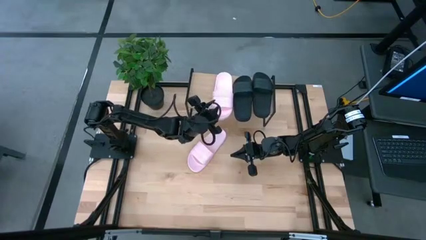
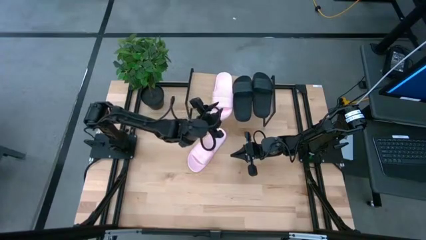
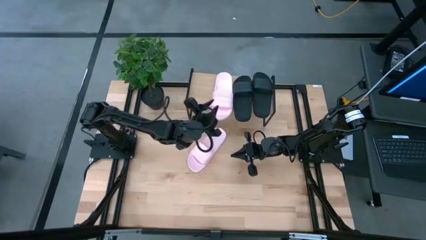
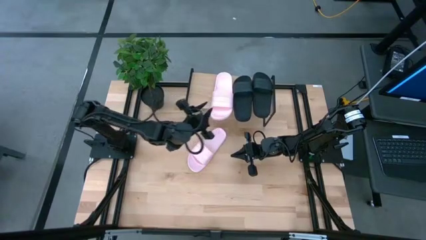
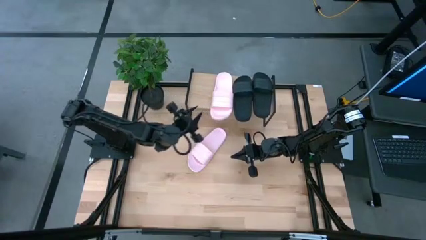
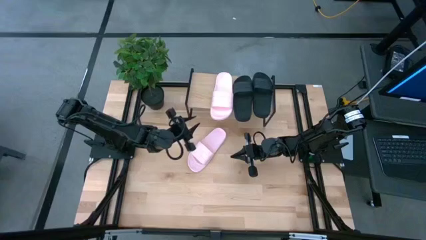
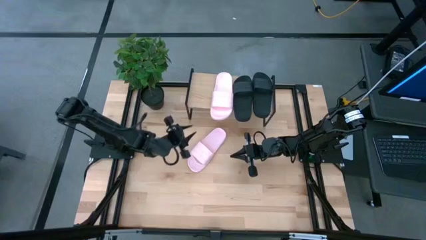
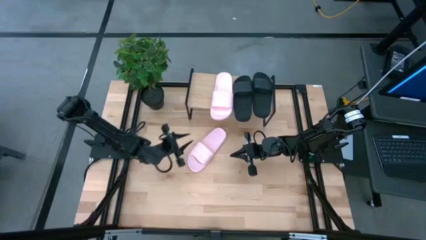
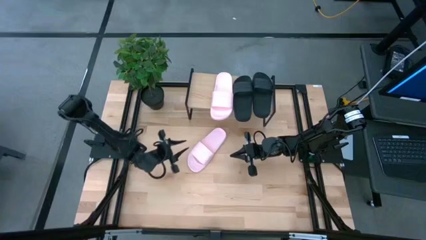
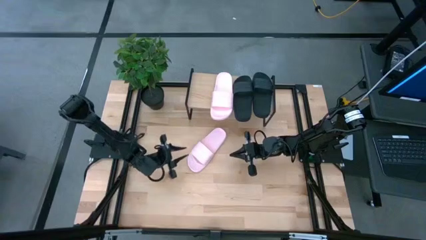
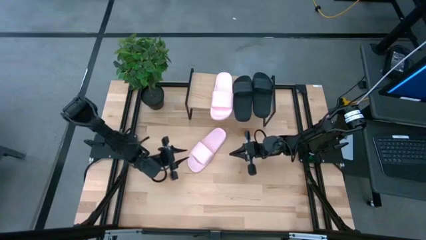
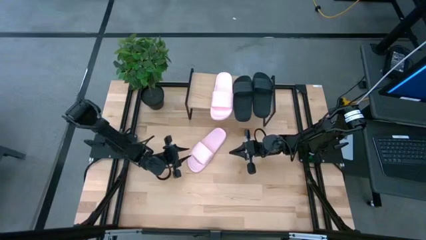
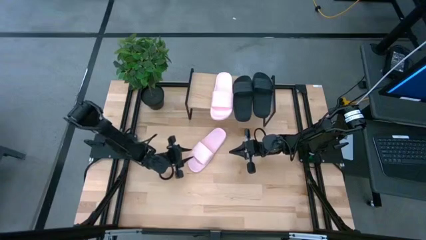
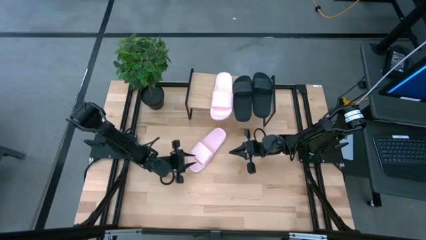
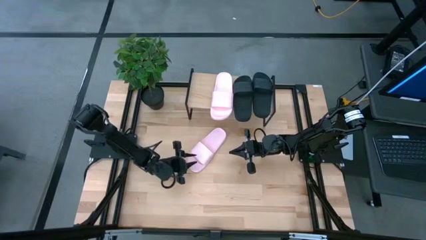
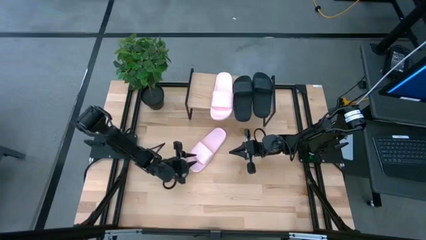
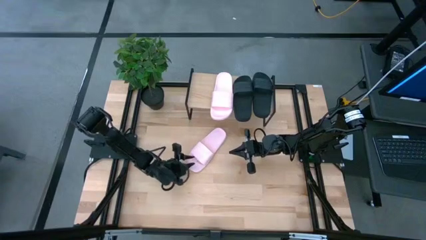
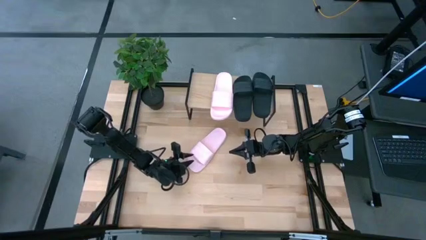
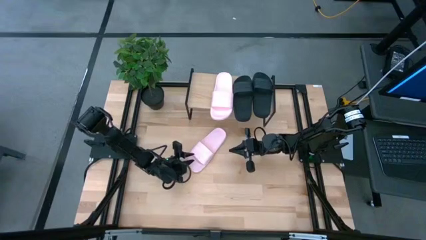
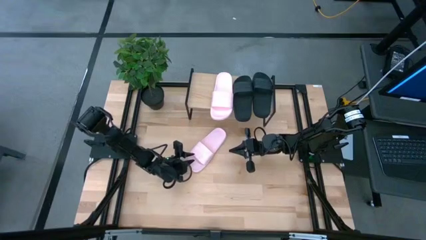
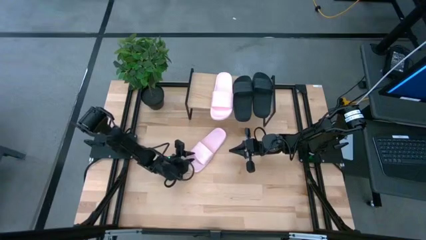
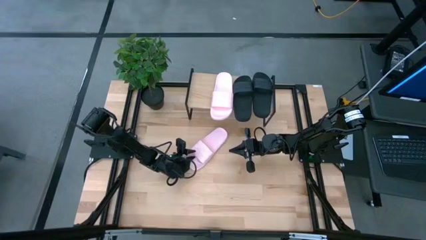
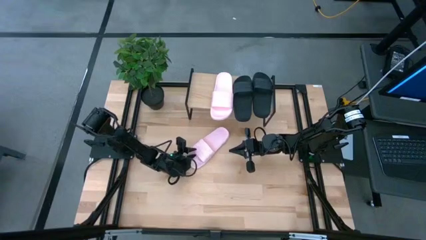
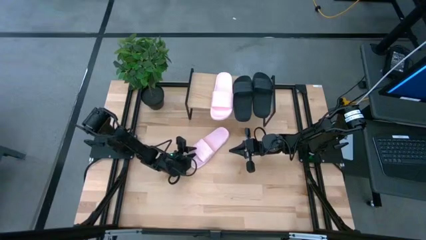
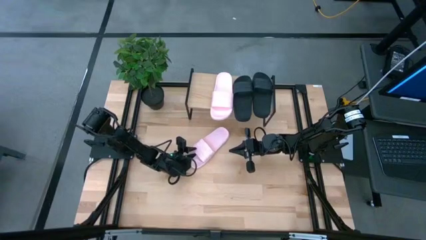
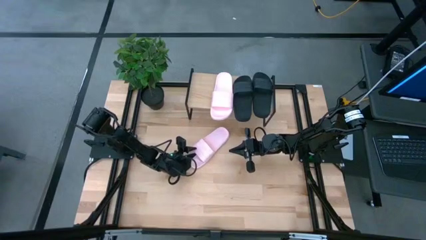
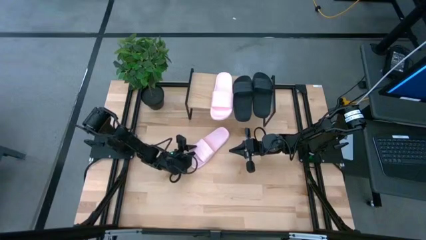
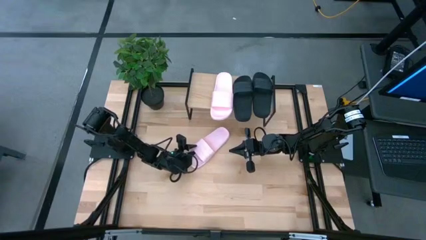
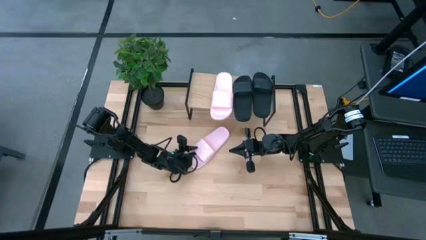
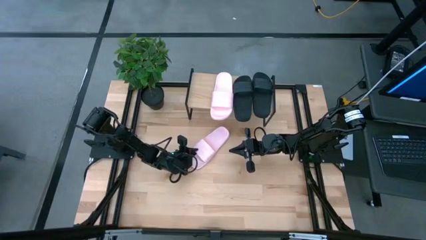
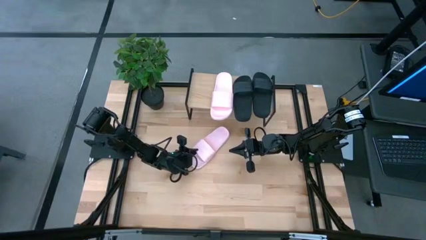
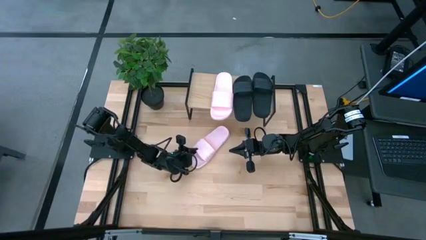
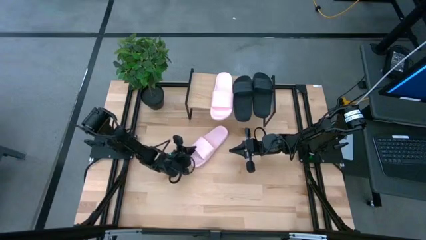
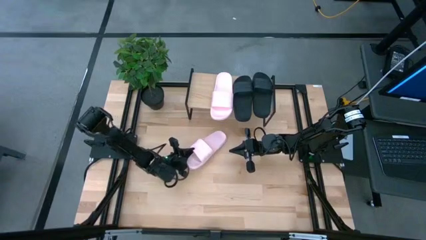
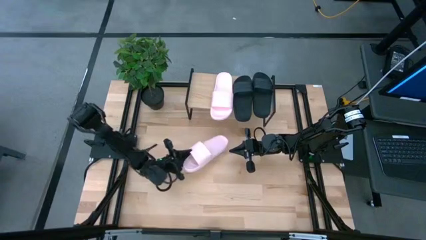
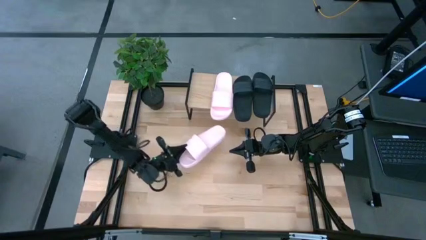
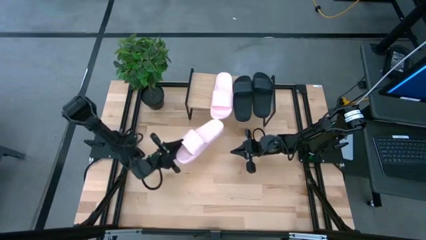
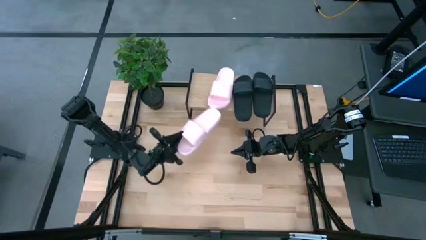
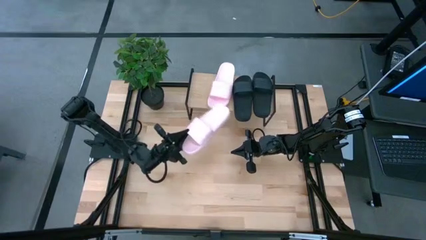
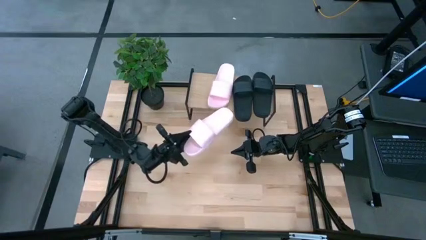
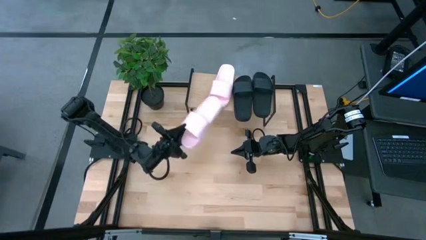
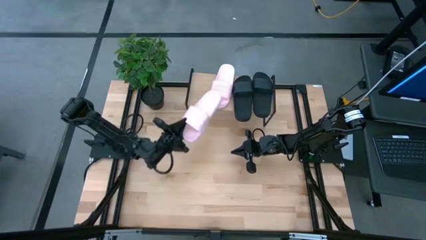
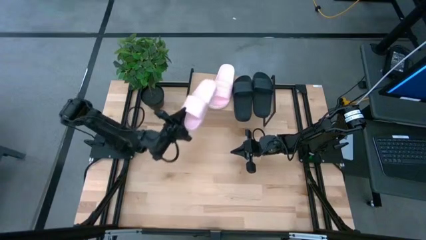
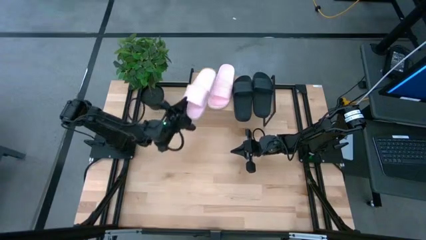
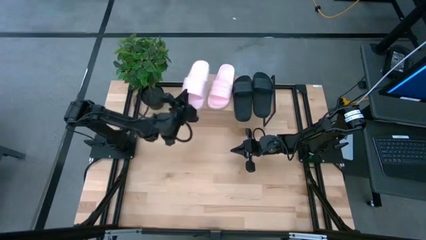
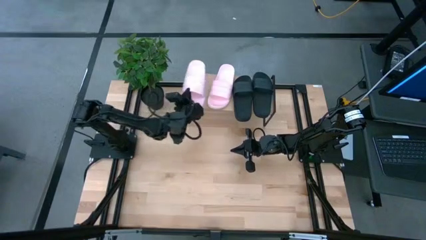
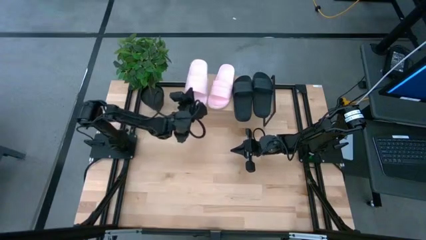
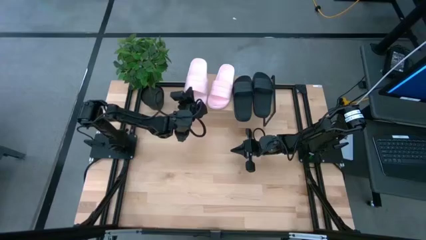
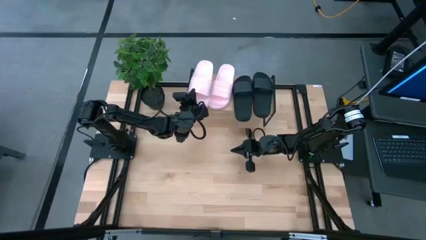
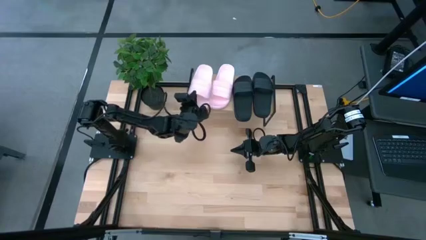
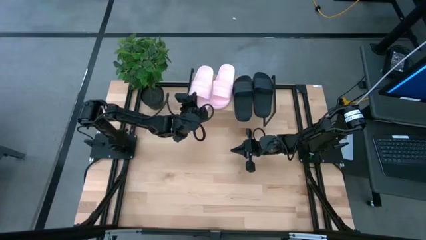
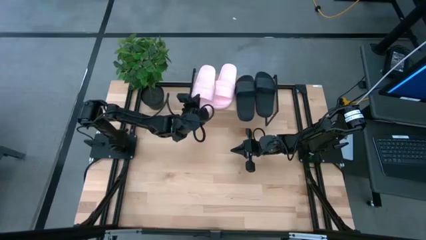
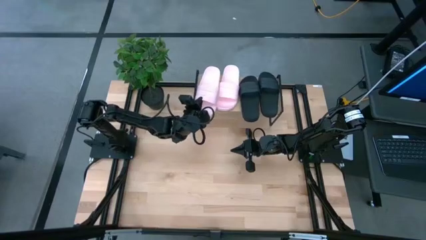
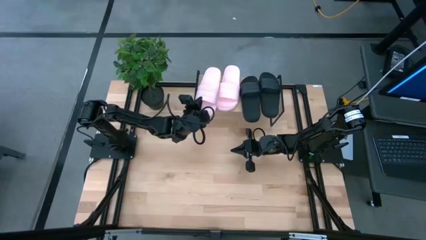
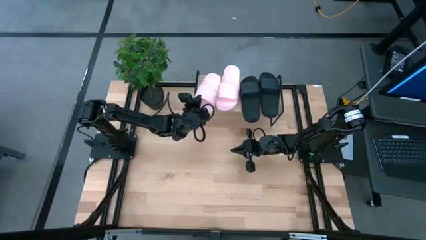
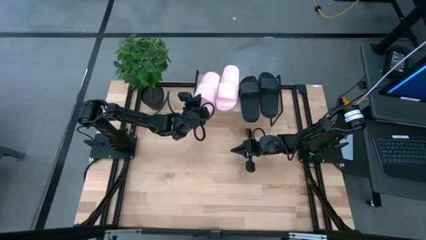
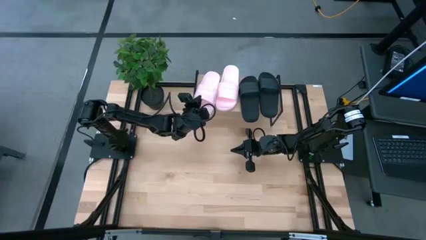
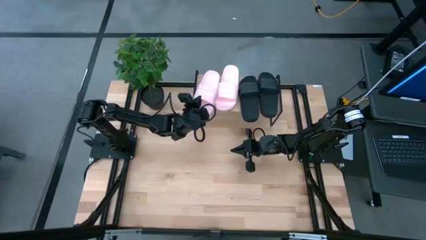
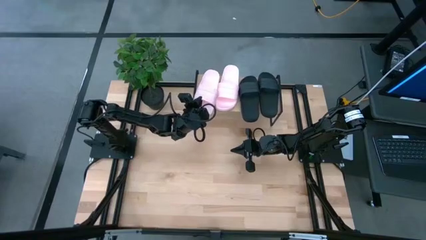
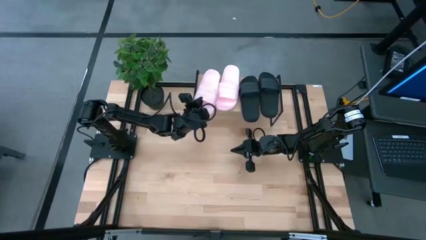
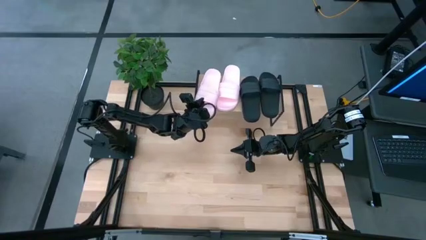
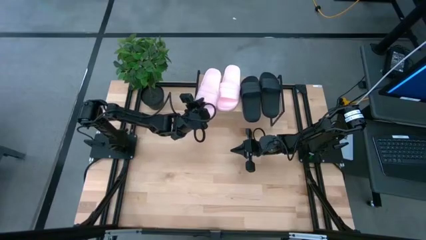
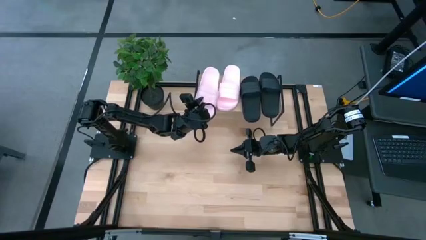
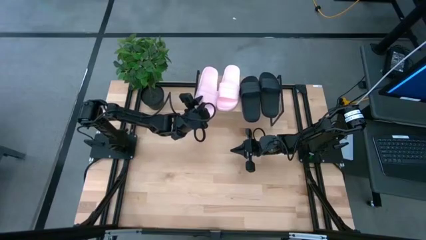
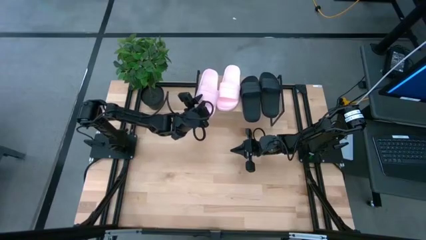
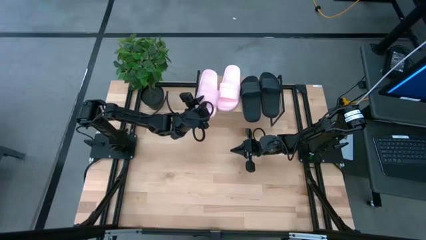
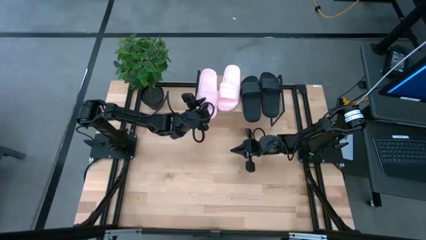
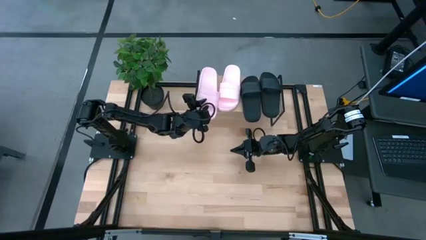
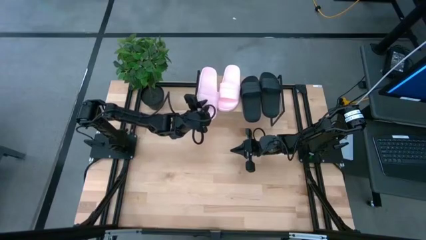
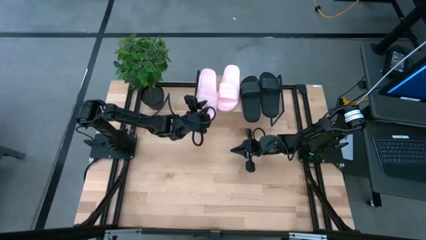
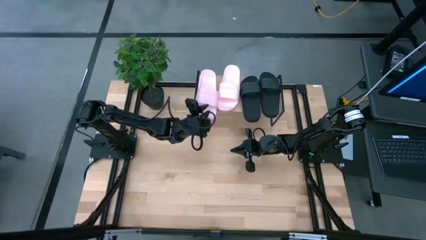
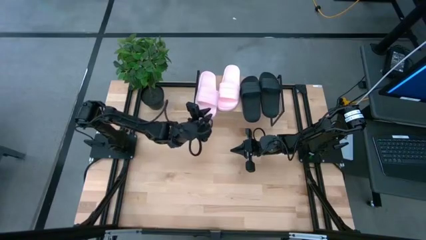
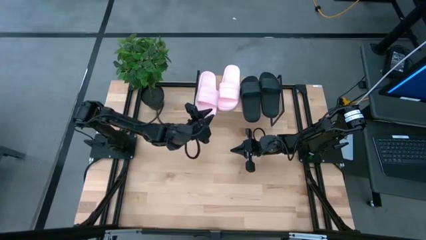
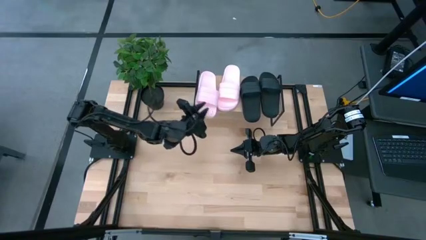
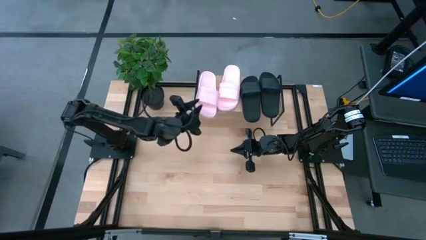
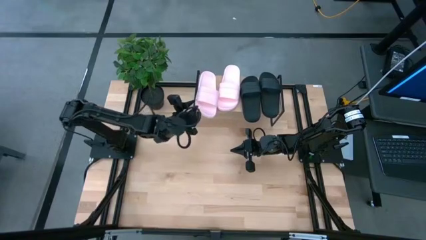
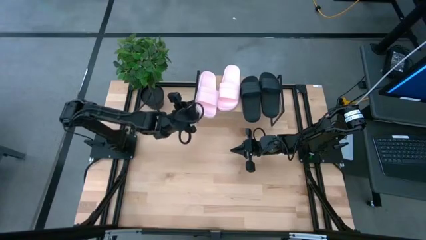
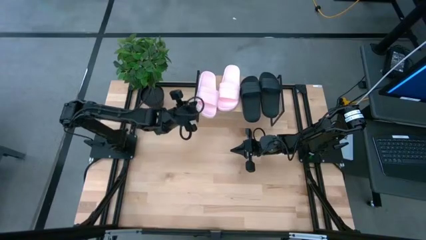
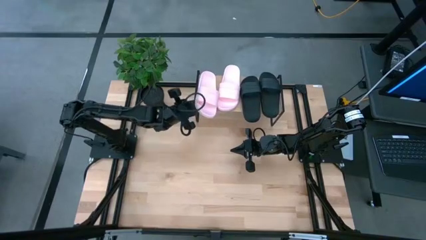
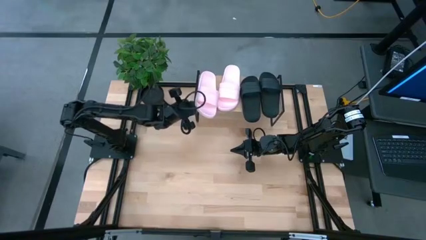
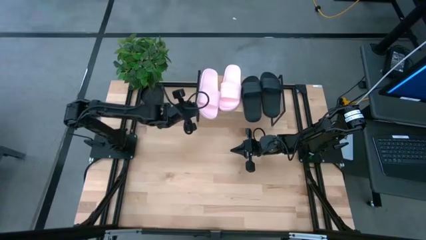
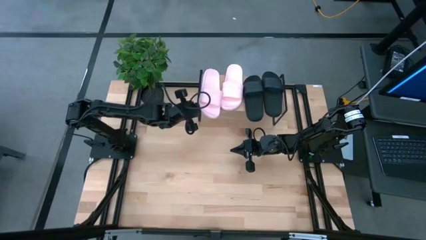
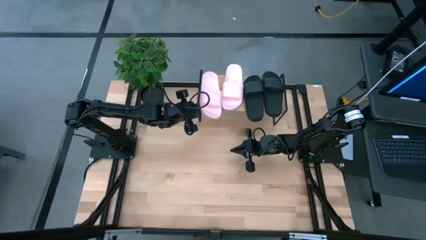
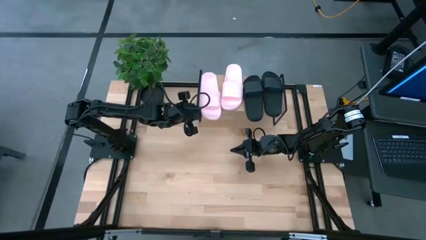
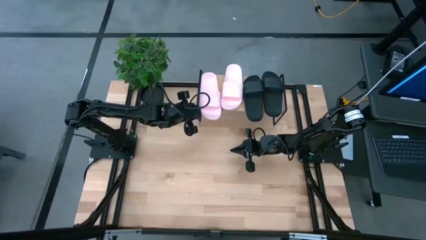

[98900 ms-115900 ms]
Task: Pick and place slides into the shelf
Put the pink slide on the shelf
